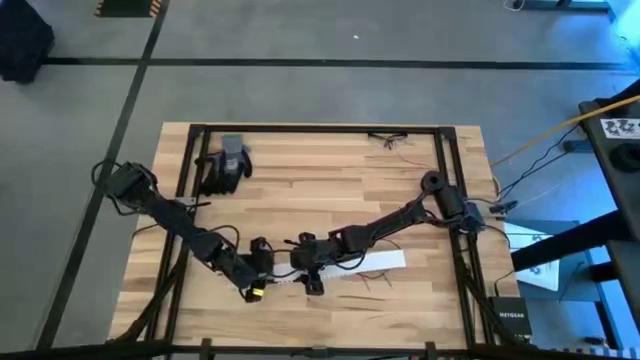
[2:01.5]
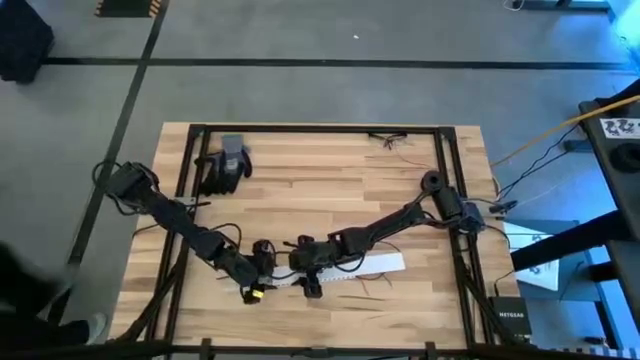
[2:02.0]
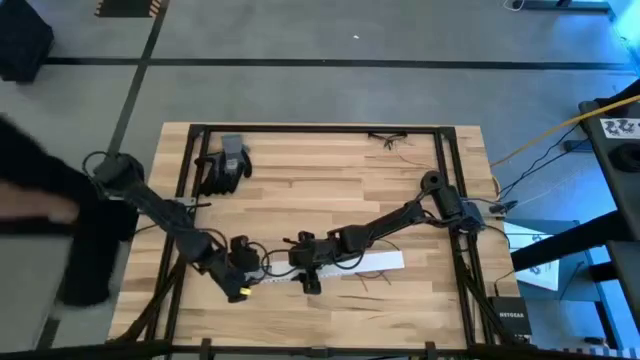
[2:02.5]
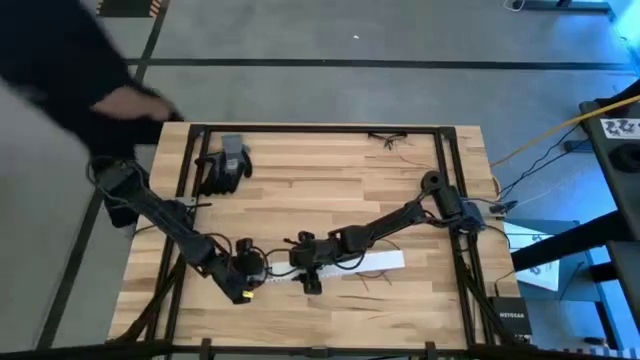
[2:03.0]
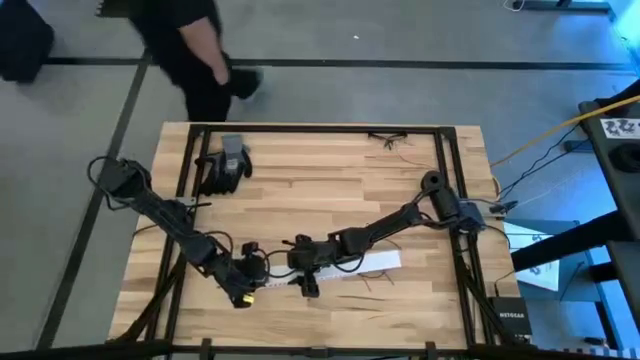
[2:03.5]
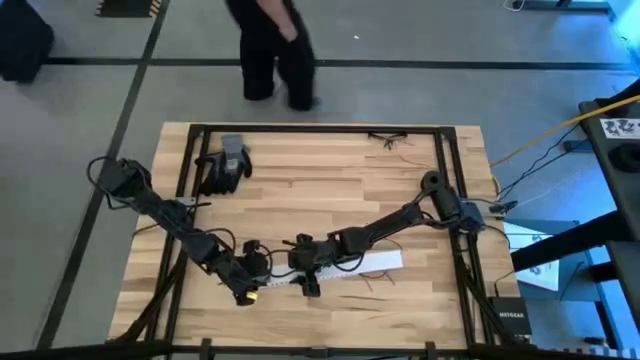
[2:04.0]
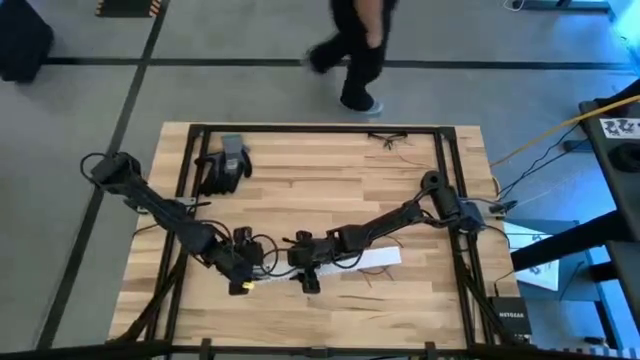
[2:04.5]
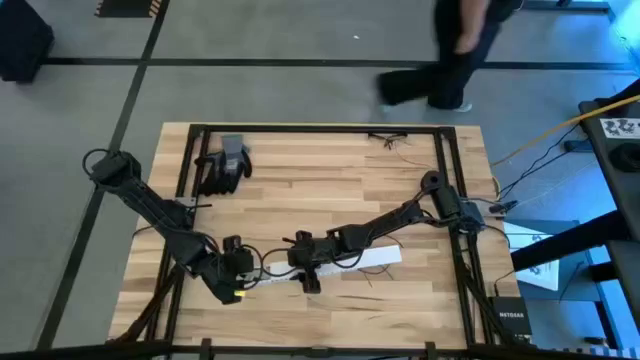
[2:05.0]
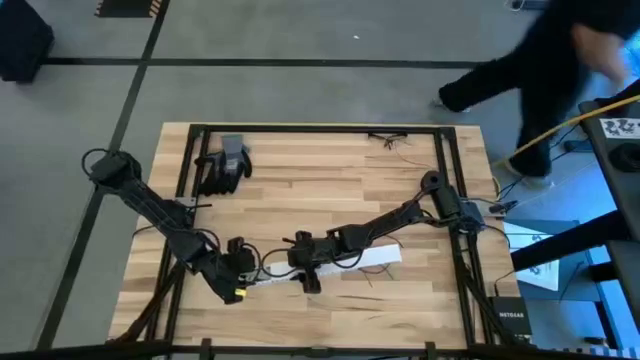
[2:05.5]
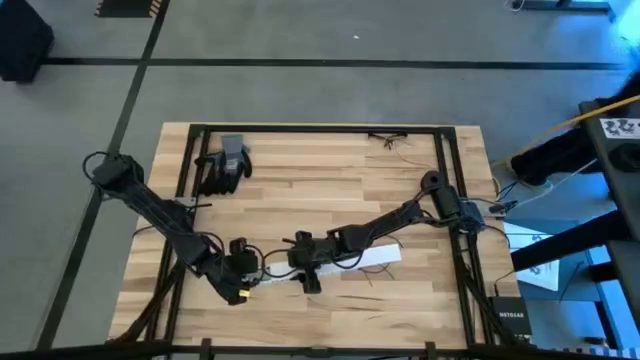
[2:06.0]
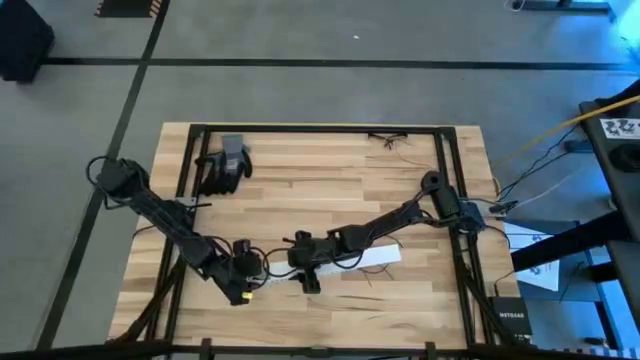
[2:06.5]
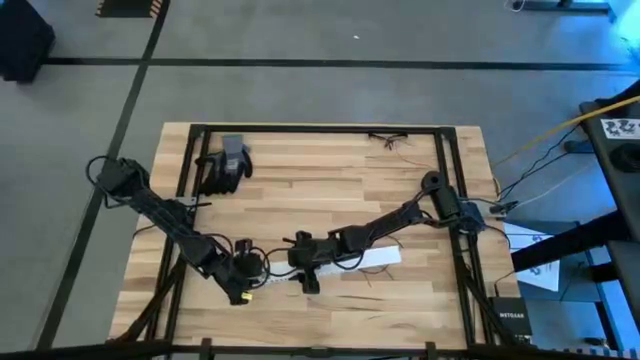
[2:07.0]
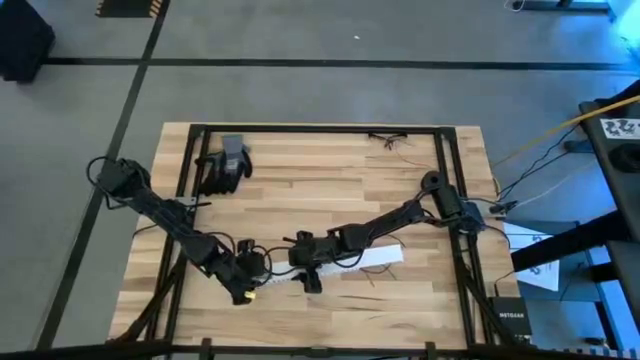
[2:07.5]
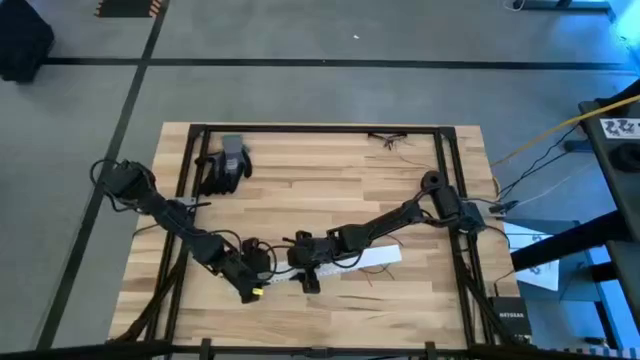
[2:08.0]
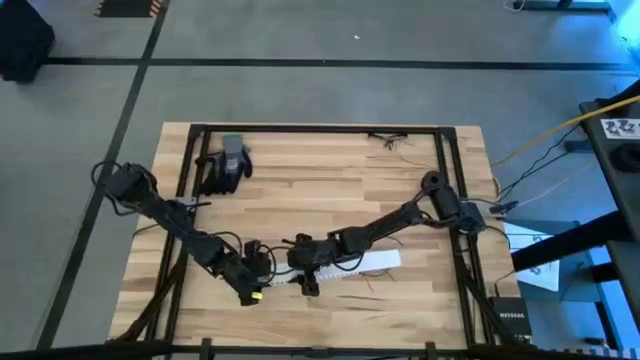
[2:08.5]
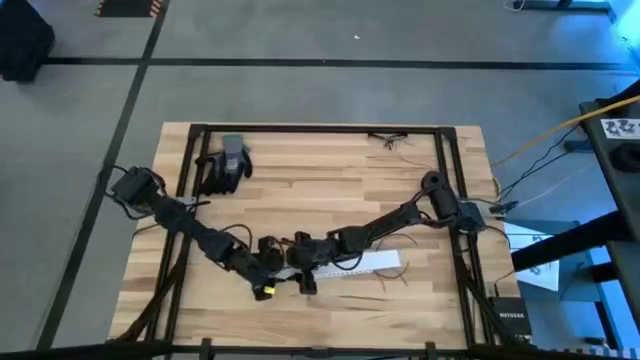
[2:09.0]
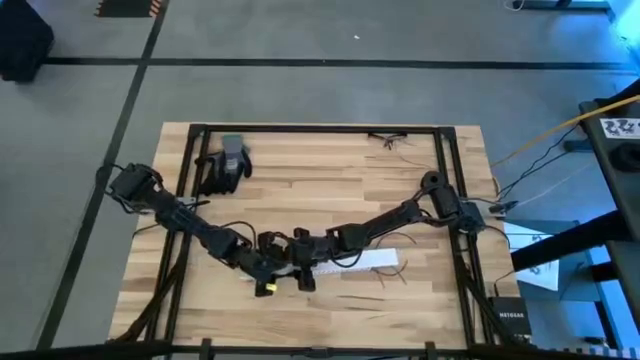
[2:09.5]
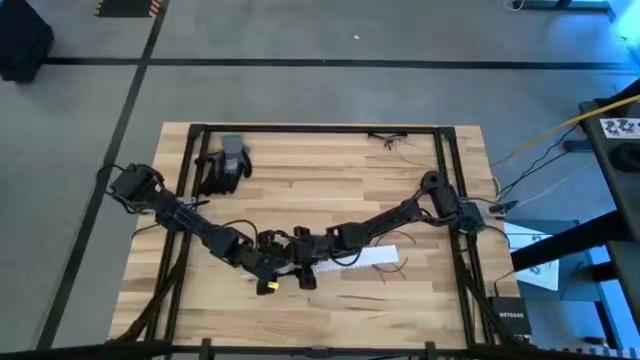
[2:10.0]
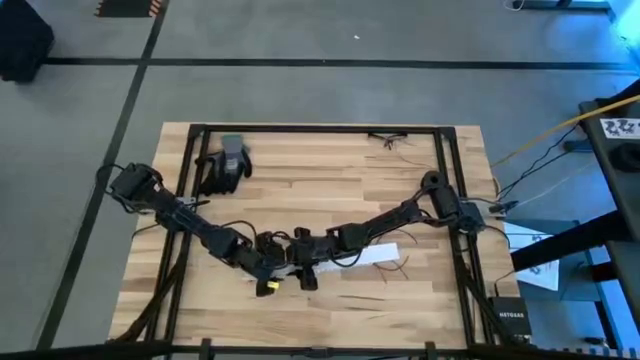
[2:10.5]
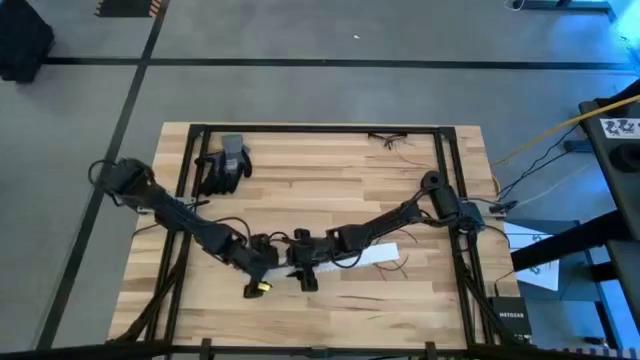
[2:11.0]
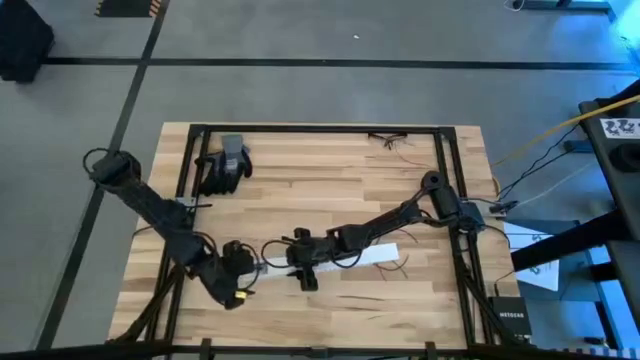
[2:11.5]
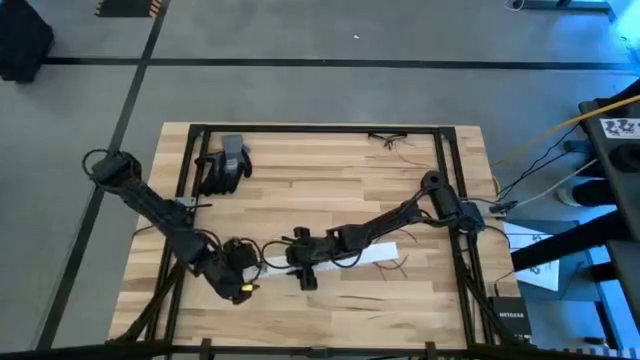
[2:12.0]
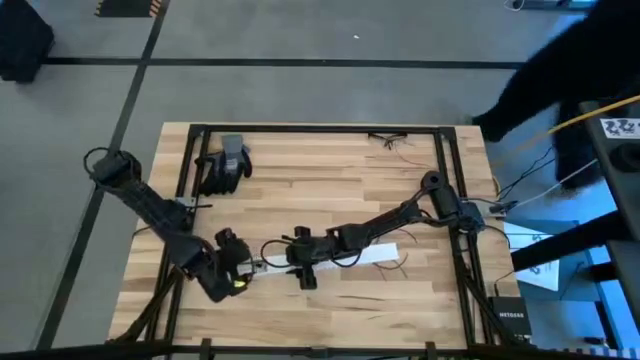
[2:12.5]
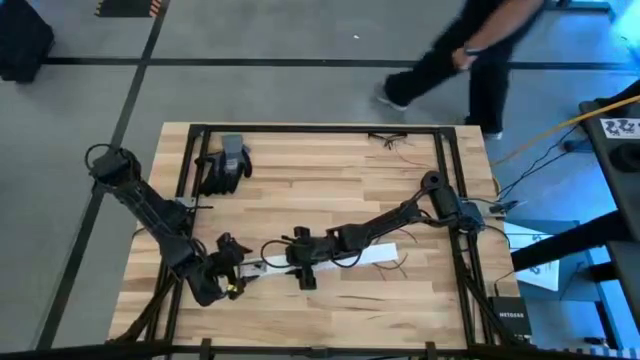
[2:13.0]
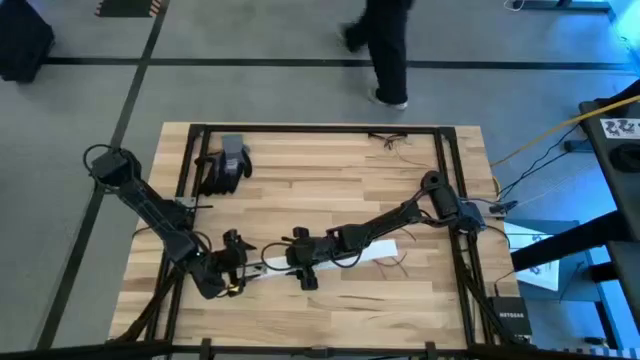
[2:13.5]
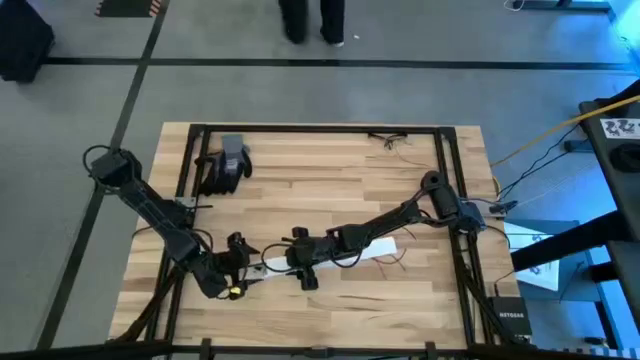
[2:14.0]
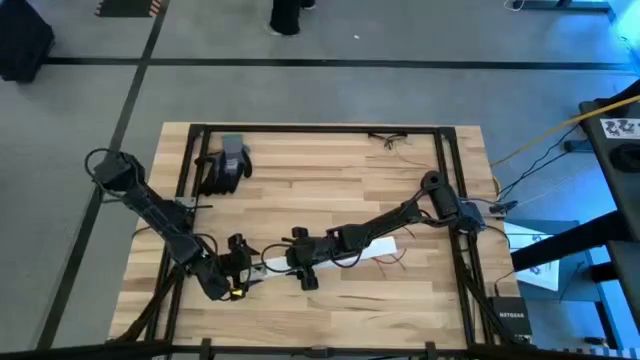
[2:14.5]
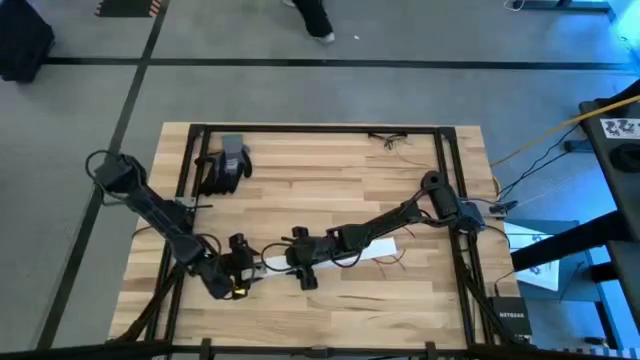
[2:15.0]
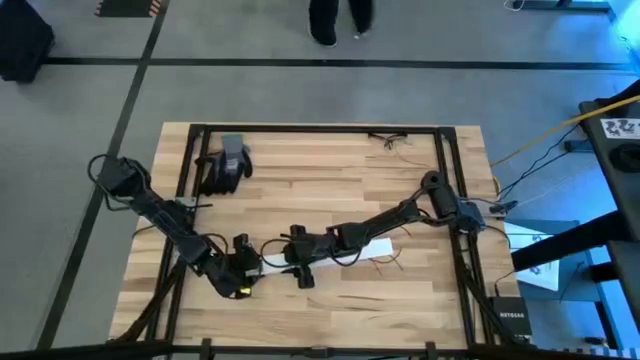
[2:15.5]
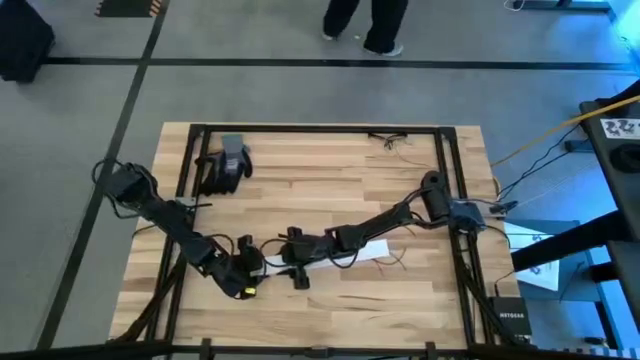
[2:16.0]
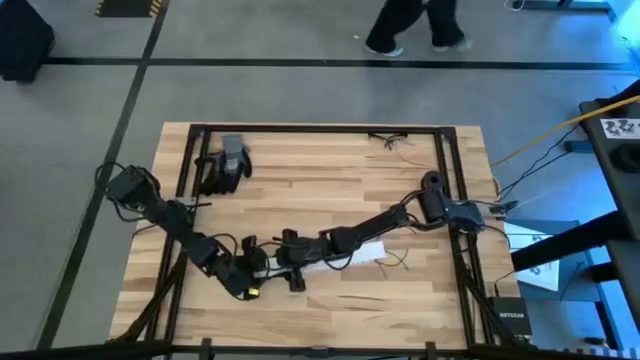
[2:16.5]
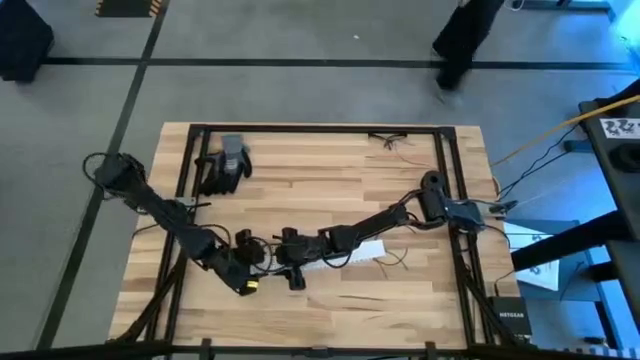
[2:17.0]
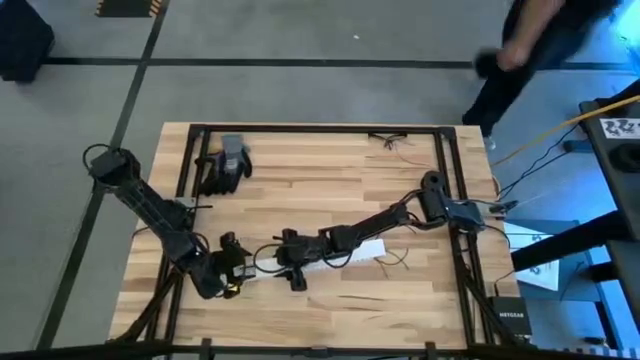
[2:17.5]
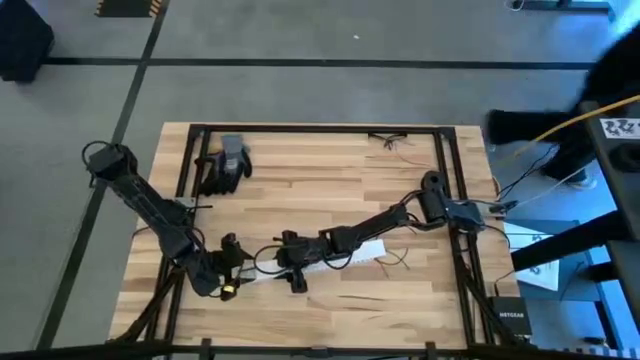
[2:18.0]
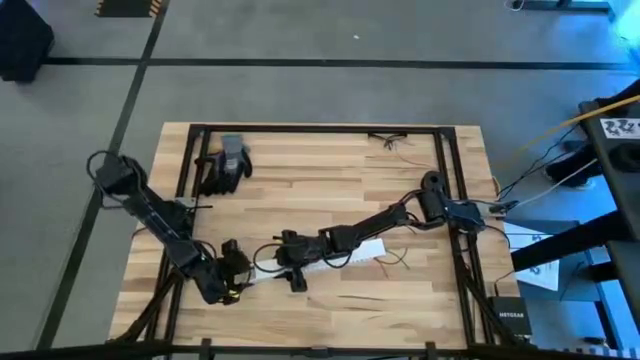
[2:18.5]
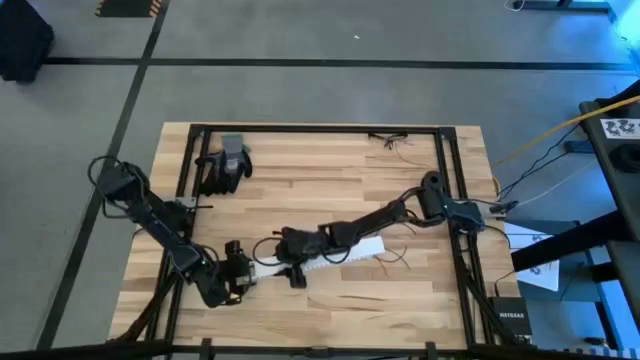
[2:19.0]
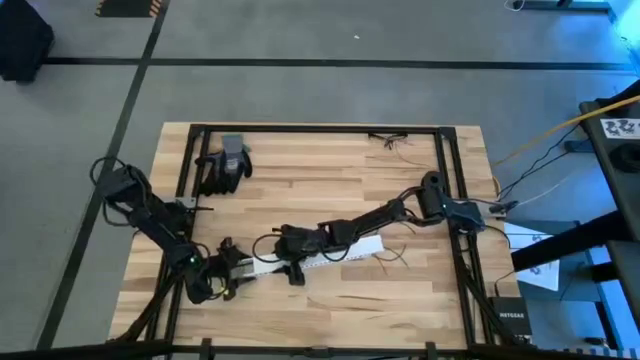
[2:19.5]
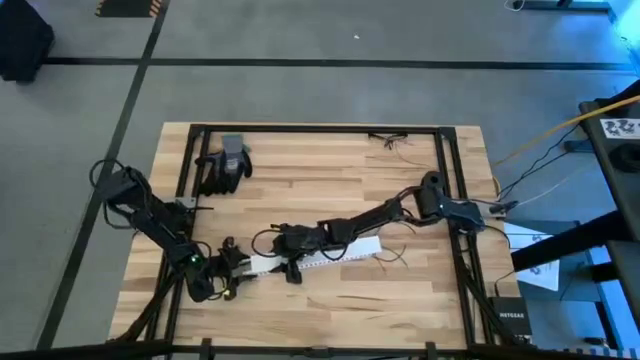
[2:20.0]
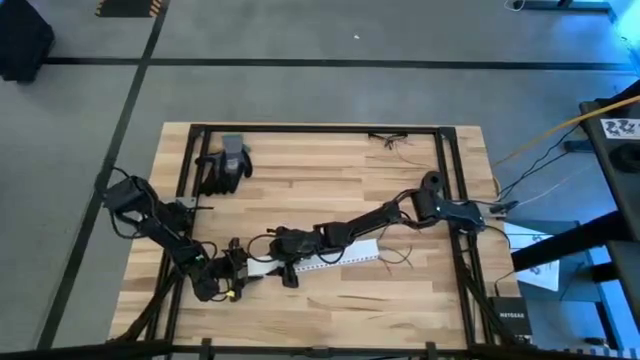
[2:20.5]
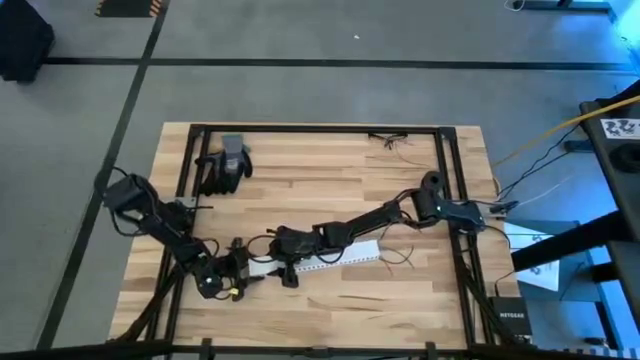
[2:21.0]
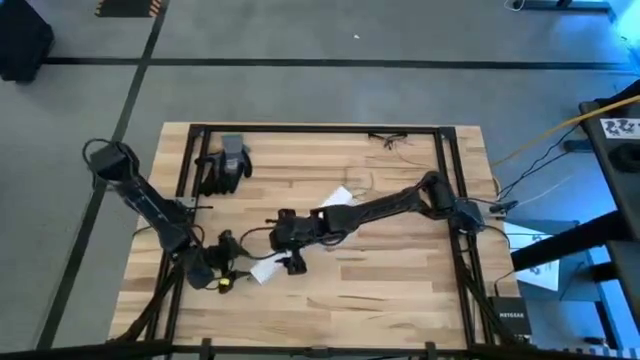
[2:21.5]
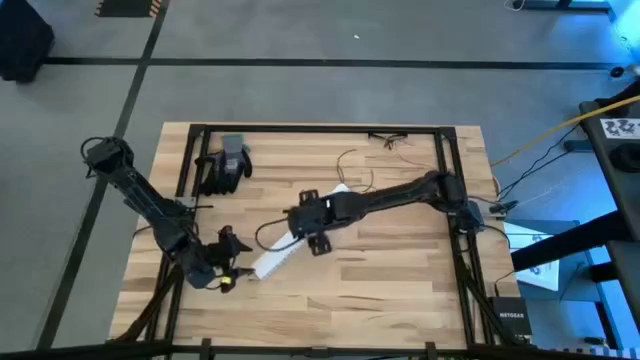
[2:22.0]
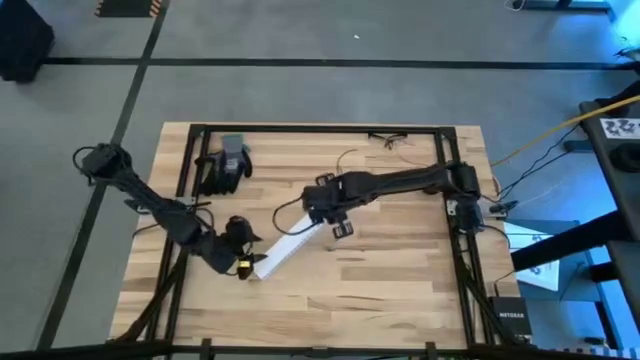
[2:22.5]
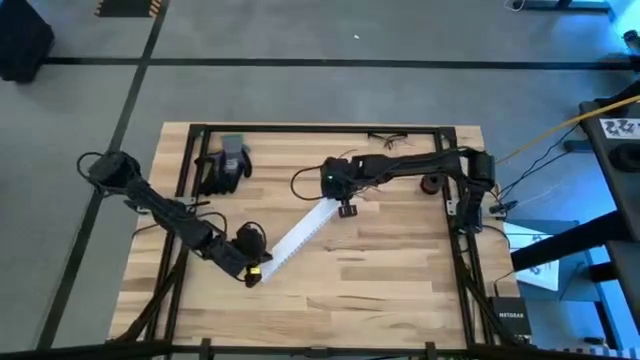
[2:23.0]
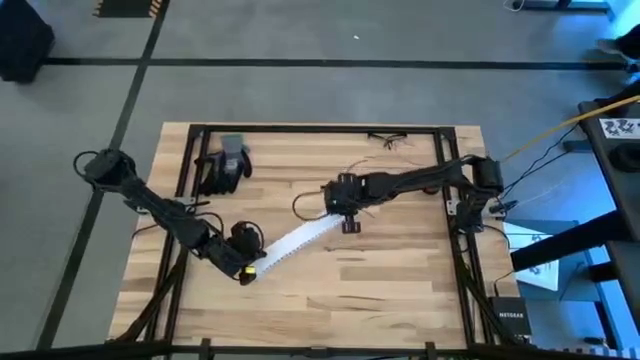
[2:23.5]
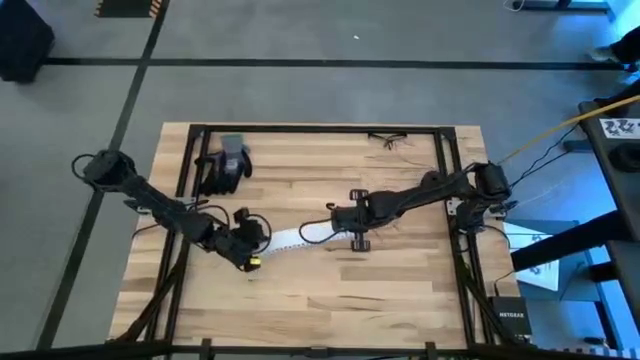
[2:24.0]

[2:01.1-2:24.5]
Task: Ziptie cables
Close the white cable duct
